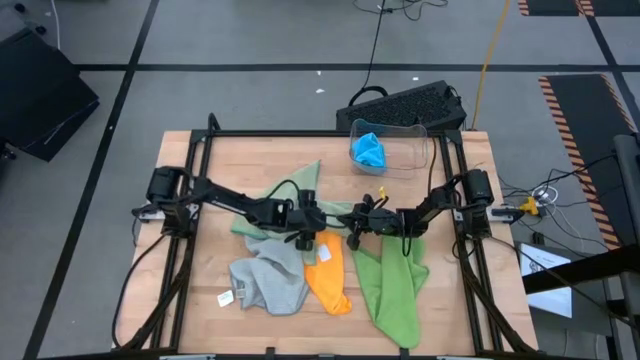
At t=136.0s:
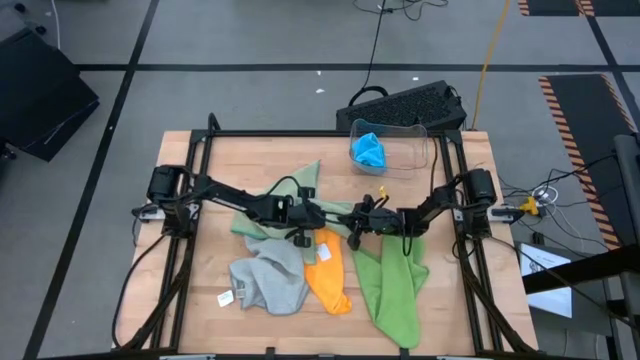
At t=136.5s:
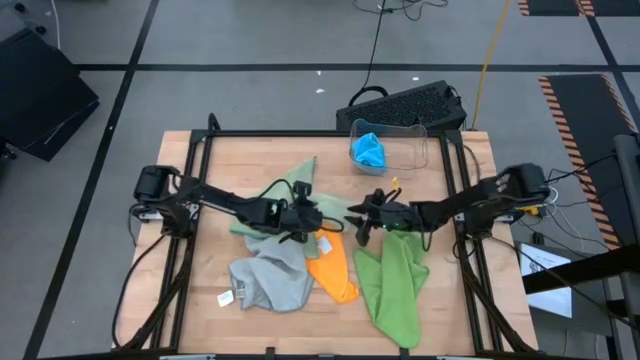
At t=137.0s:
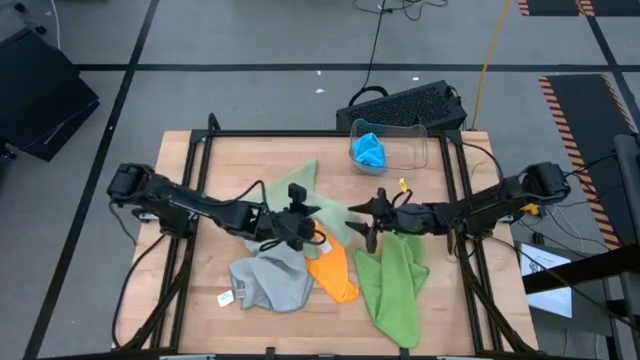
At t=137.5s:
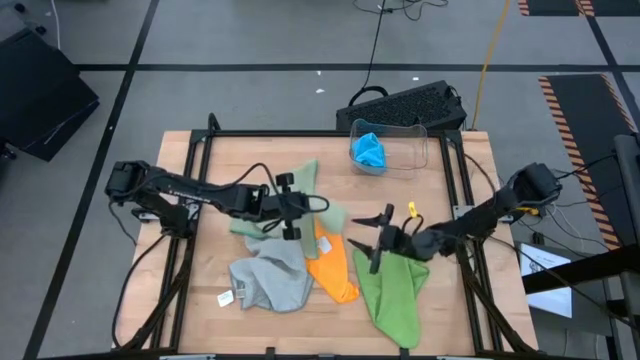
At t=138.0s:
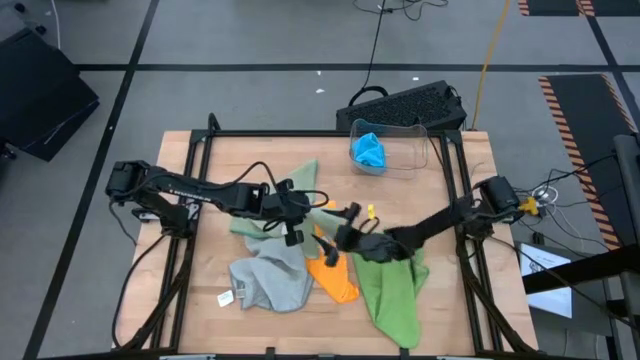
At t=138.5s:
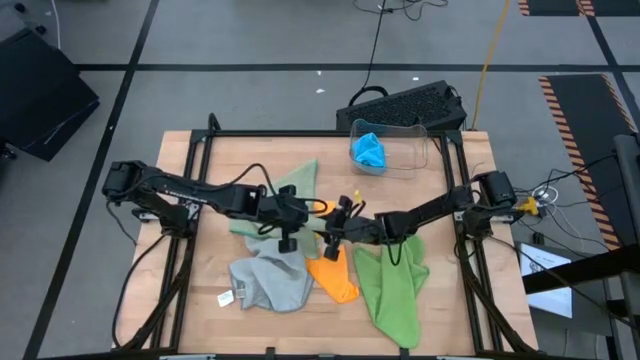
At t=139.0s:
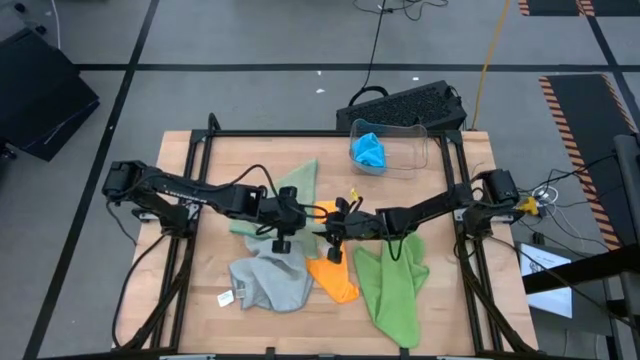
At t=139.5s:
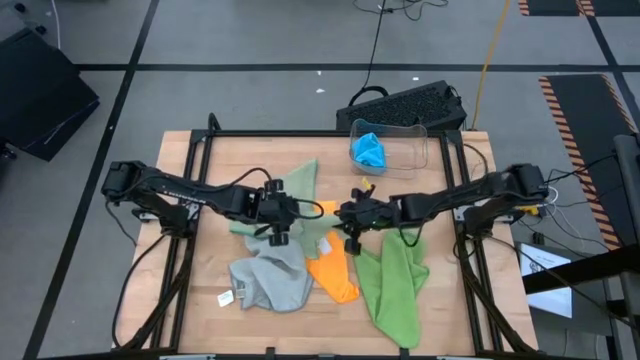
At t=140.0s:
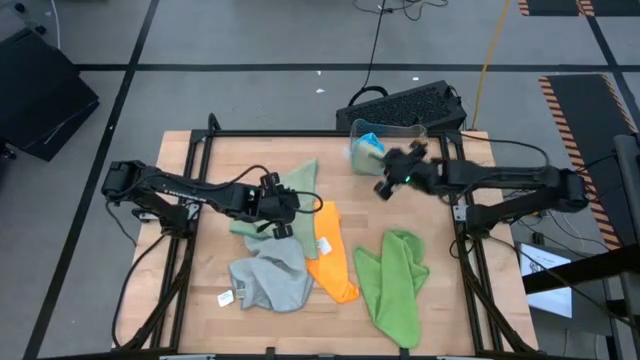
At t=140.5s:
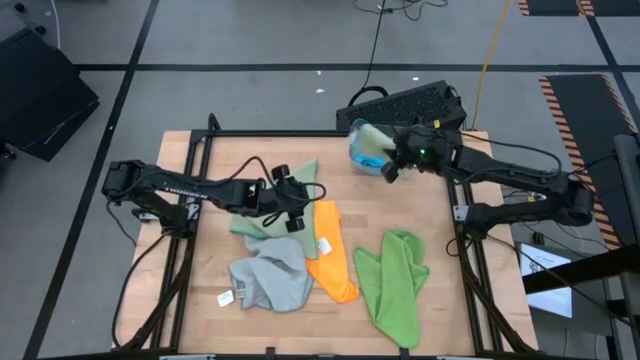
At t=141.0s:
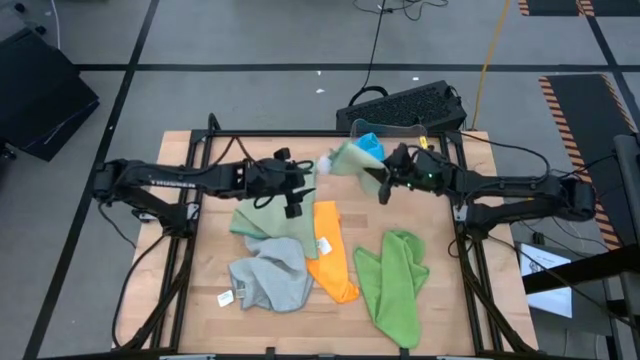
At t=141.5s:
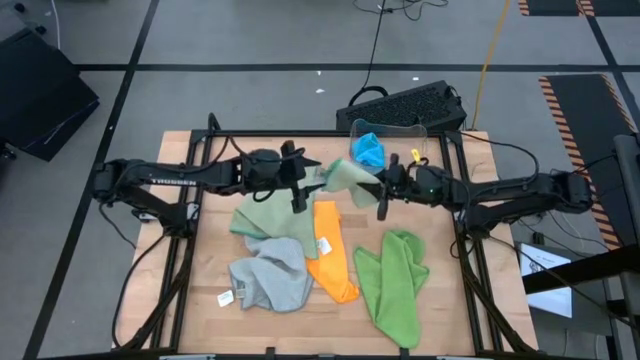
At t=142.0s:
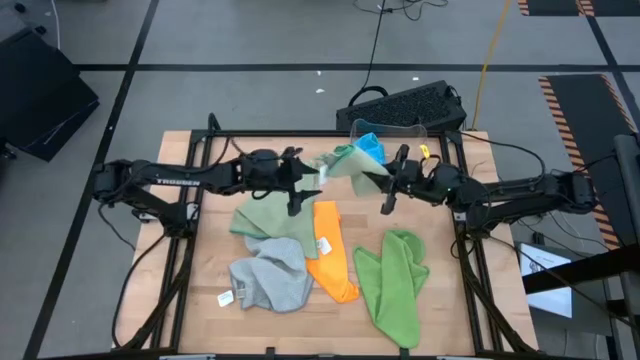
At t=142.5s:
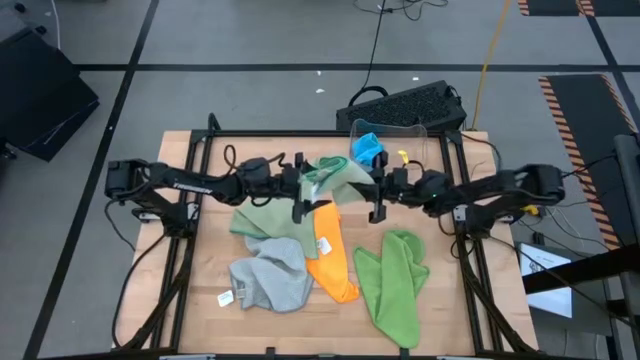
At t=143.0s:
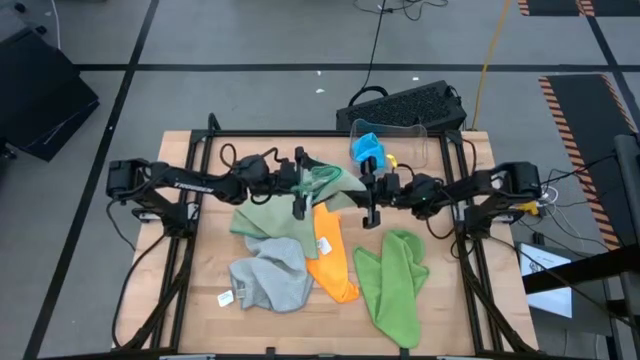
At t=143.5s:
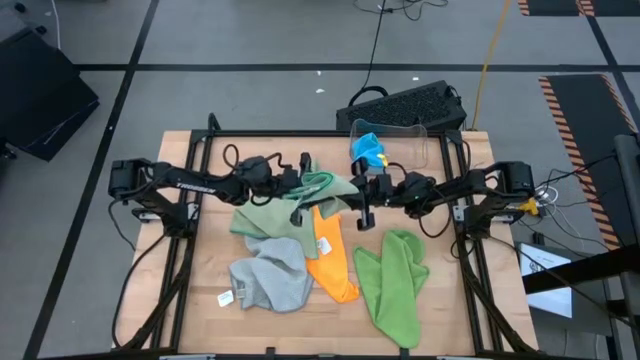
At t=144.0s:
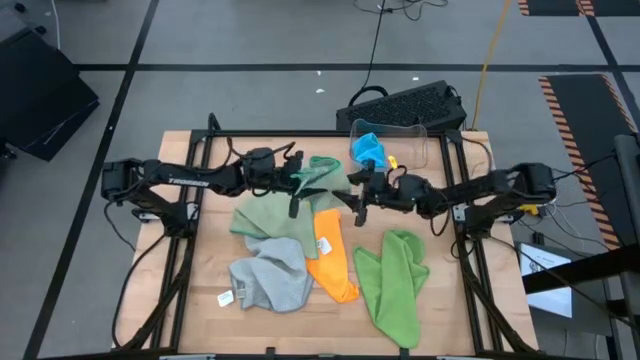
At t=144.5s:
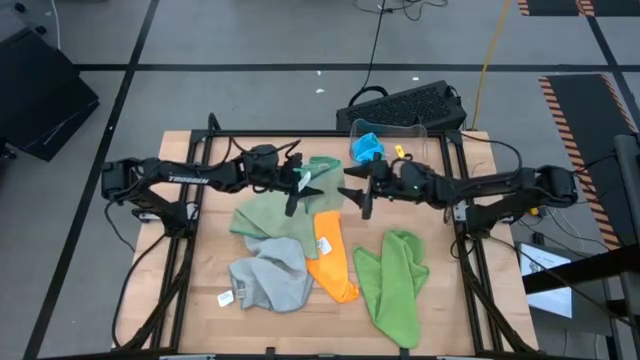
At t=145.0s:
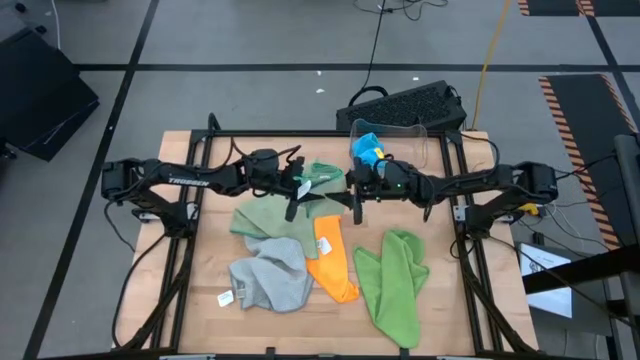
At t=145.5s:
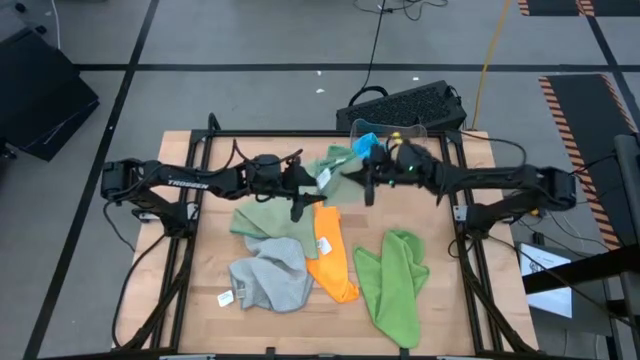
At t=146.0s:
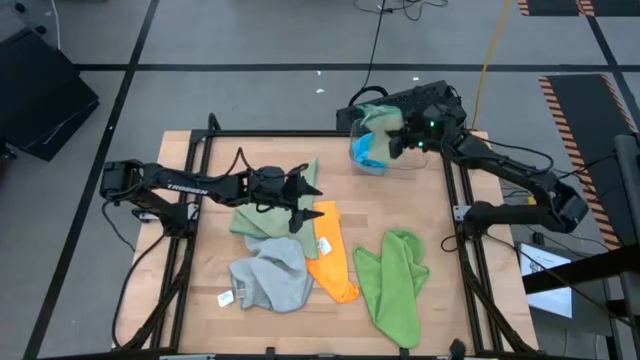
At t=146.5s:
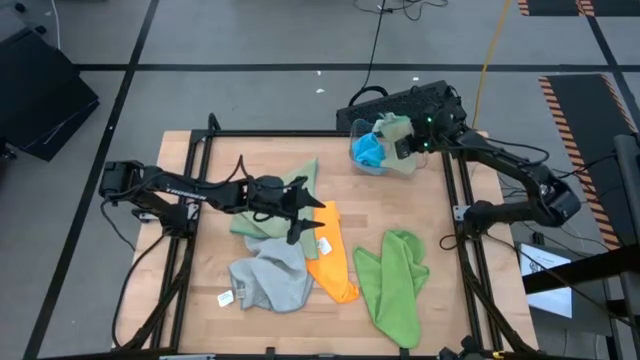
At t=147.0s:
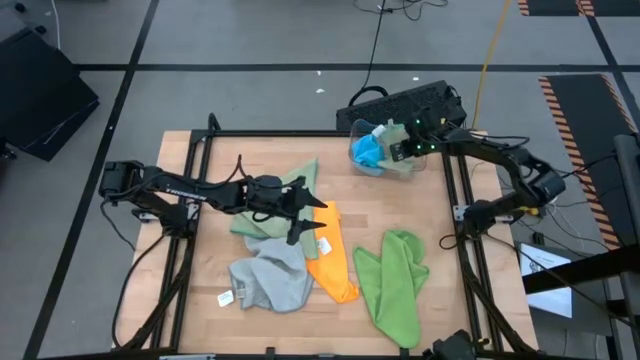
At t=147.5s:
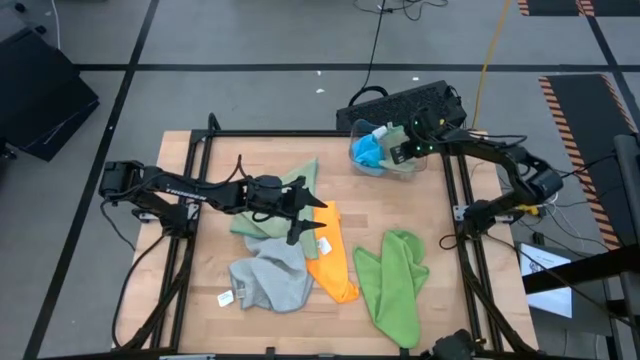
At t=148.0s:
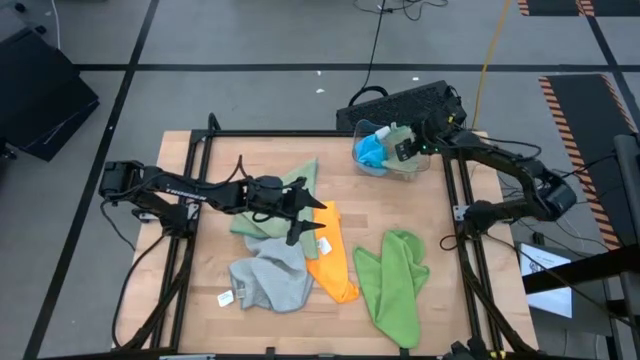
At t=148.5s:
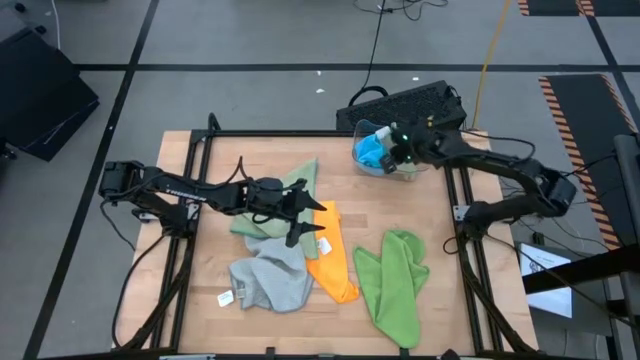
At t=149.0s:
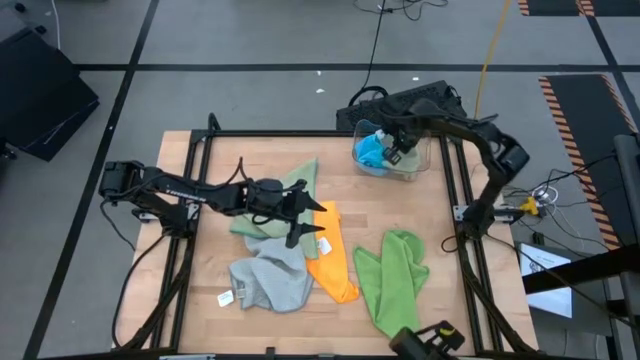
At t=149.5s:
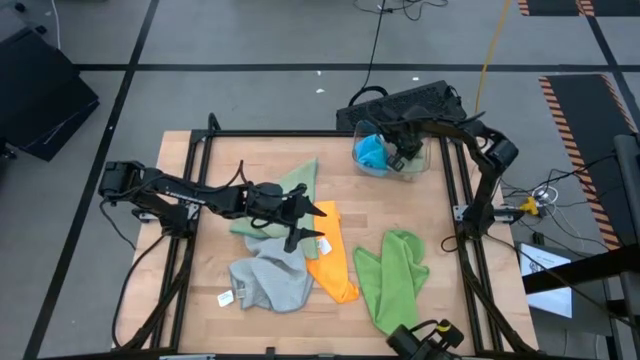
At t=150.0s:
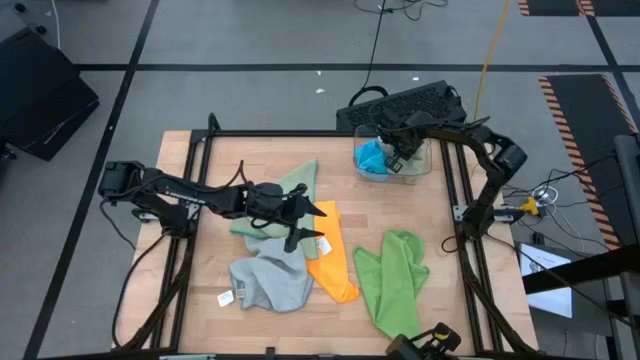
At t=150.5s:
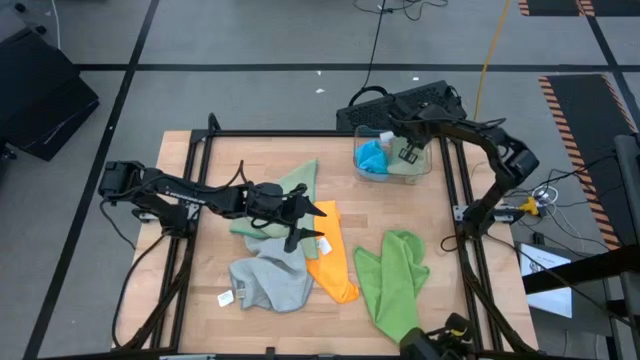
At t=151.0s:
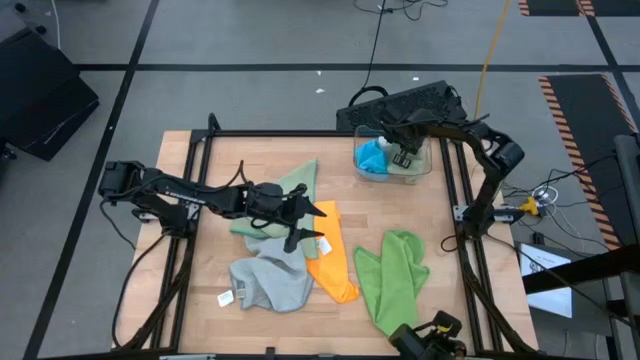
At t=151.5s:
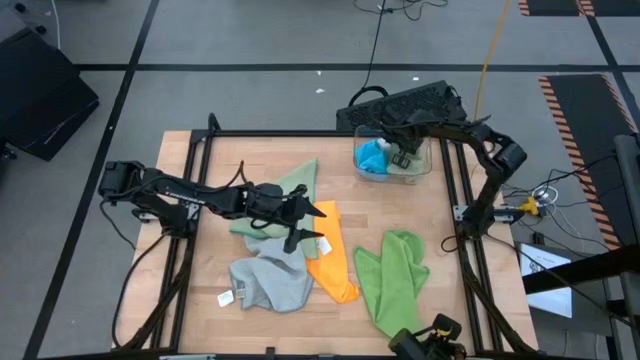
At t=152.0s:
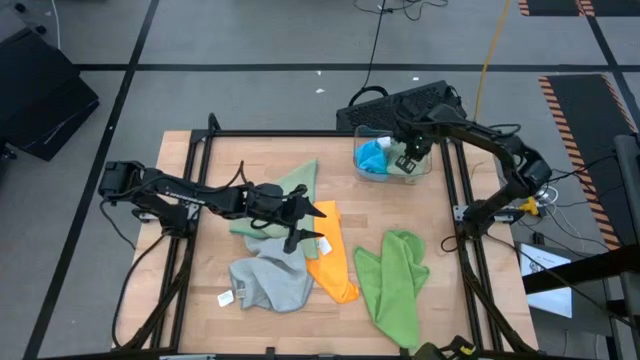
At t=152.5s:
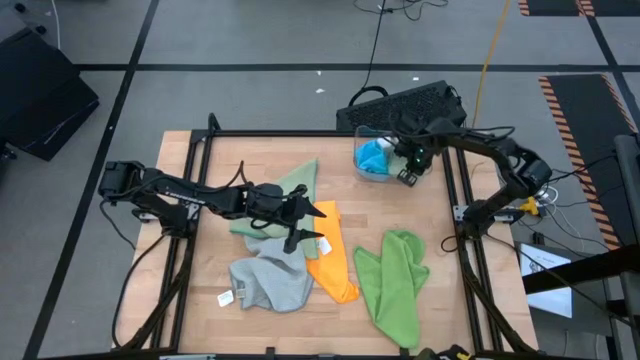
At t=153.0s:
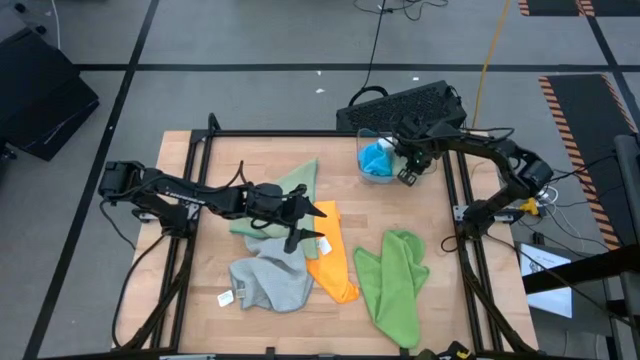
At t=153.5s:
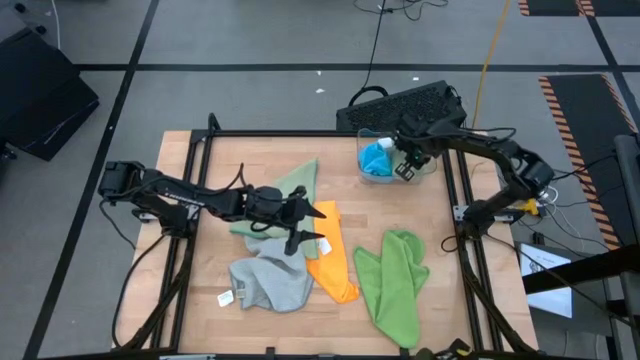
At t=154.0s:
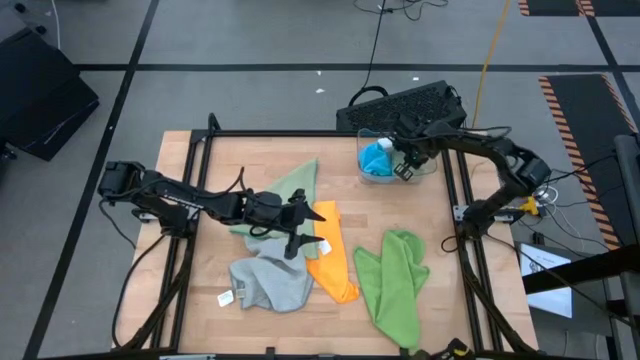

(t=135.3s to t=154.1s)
Task: Fold microfiber towels
Put the right light green microfiber towel into the transparent bin

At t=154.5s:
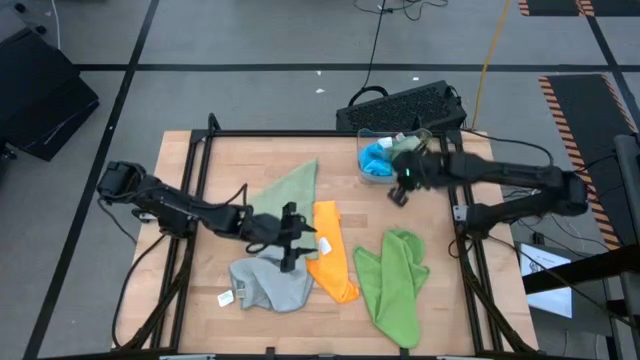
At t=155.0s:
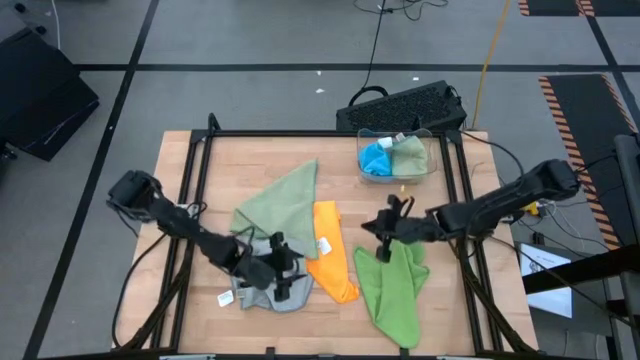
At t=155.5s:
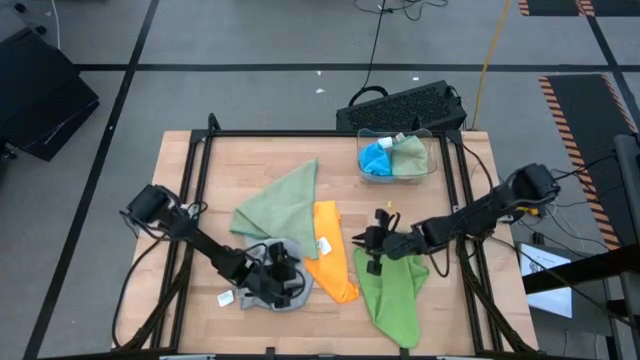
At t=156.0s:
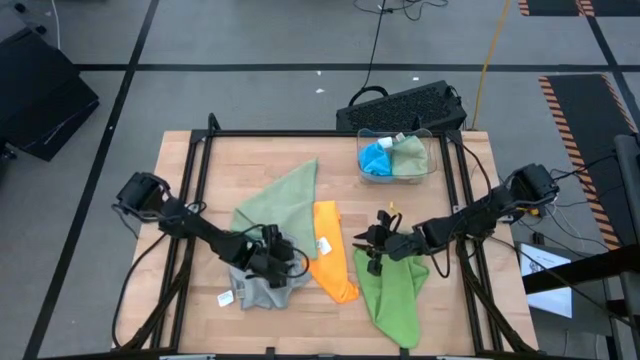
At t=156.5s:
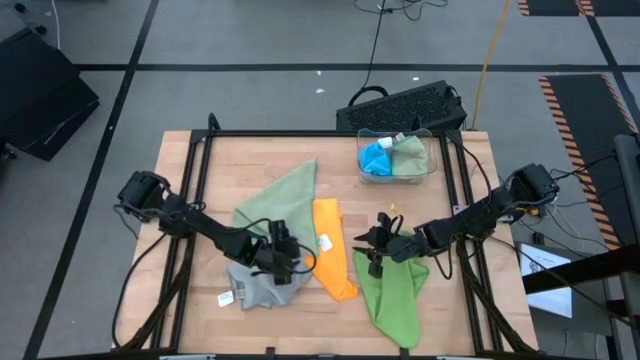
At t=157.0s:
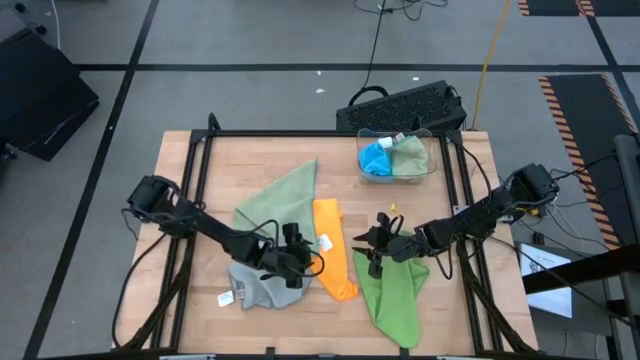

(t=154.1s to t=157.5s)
Fold the light green microfiber towel

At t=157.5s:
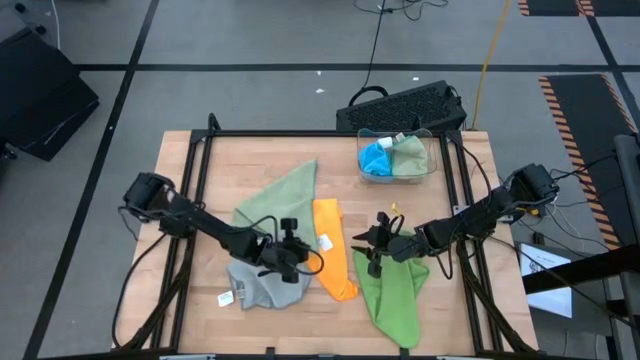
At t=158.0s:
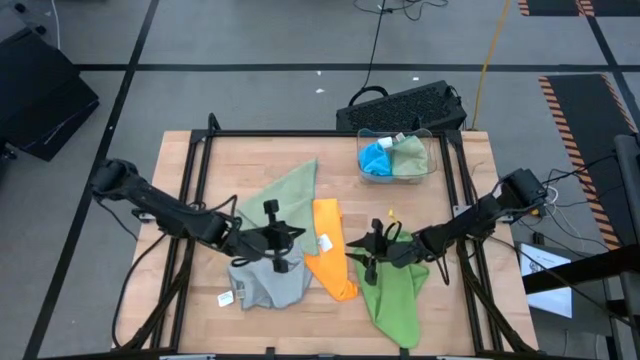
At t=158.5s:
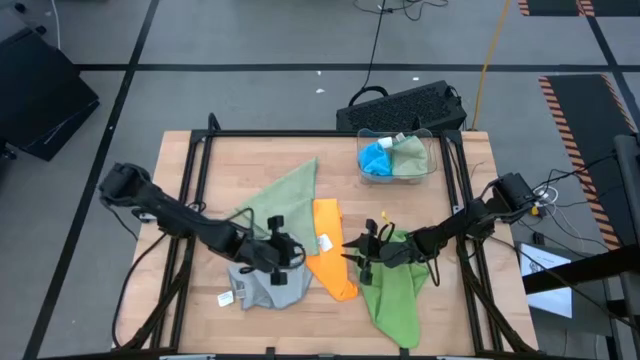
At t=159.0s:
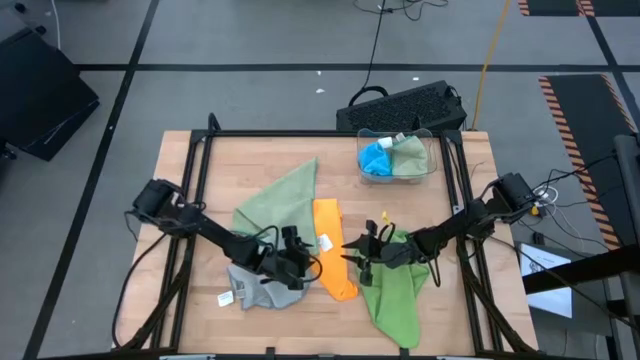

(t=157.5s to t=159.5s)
Fold the light green microfiber towel
